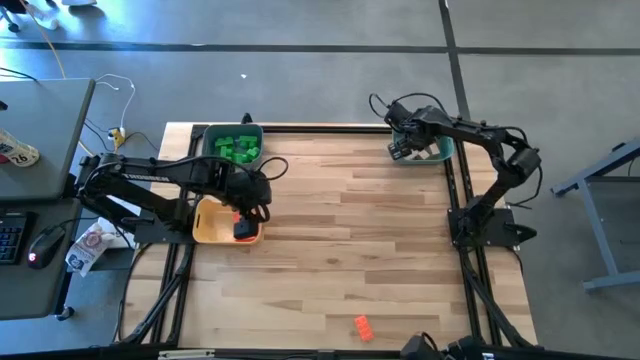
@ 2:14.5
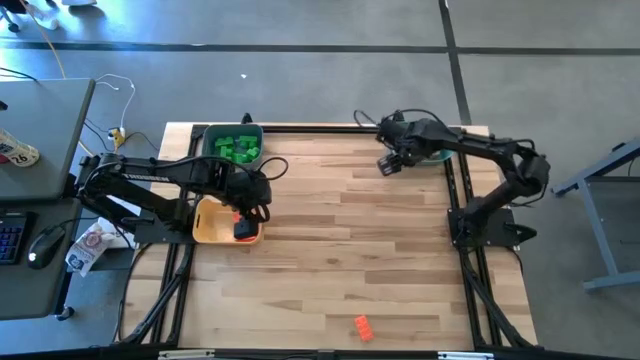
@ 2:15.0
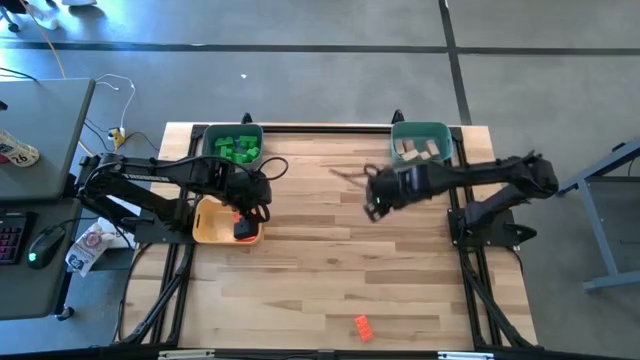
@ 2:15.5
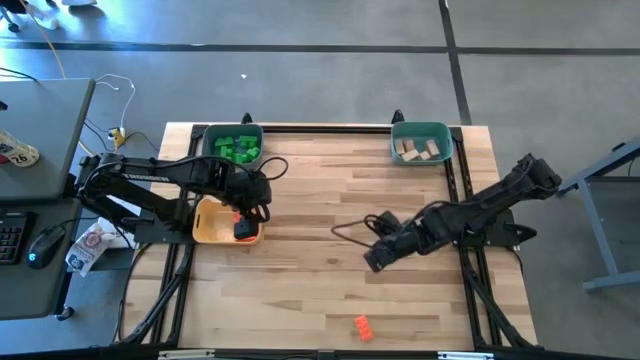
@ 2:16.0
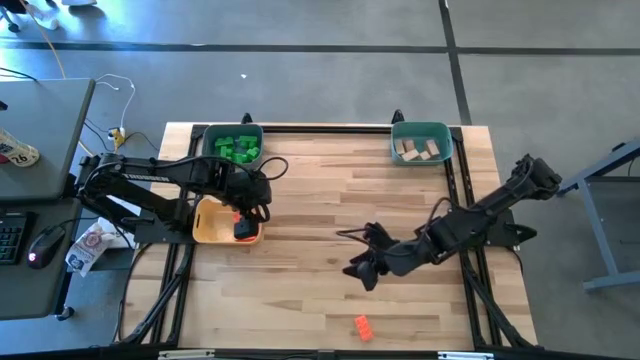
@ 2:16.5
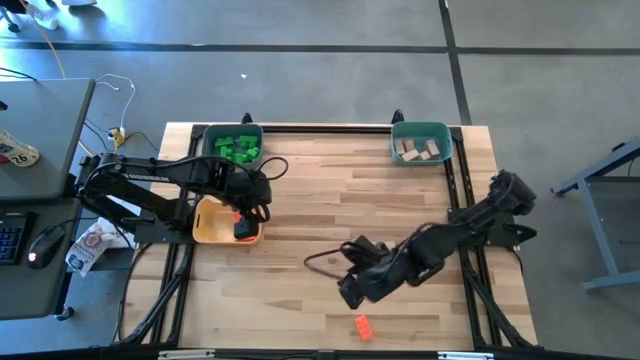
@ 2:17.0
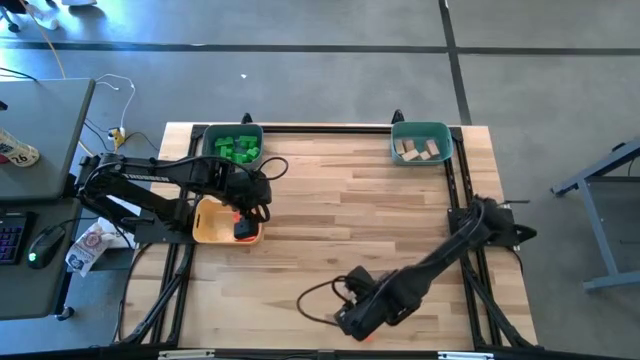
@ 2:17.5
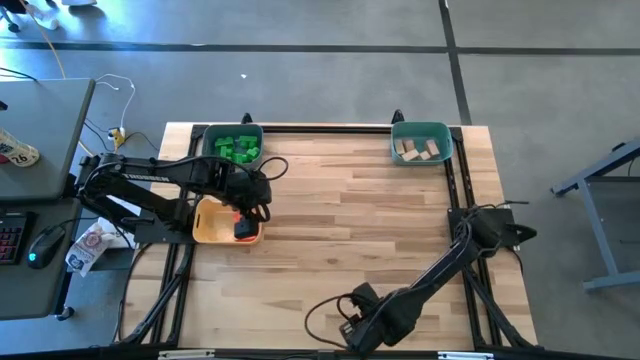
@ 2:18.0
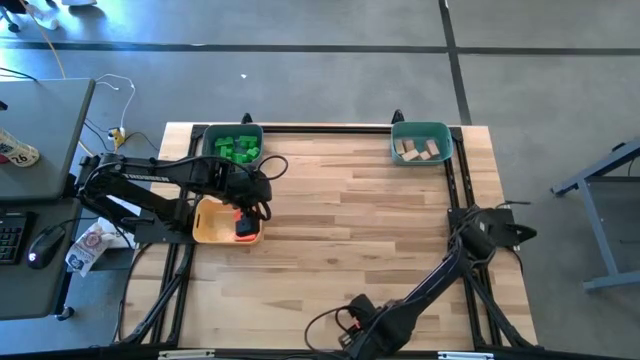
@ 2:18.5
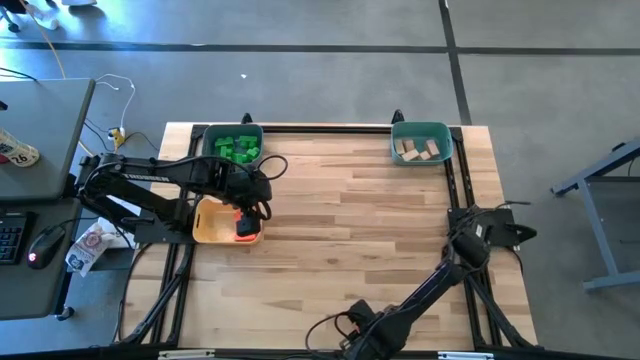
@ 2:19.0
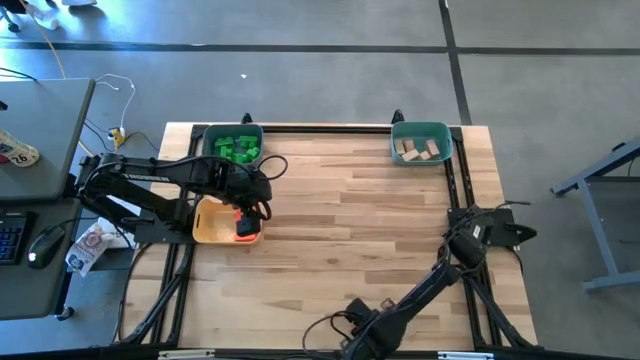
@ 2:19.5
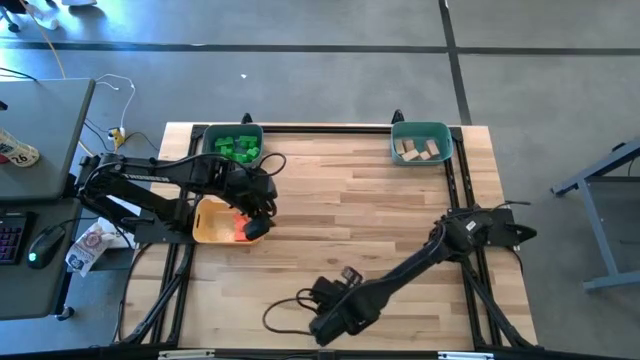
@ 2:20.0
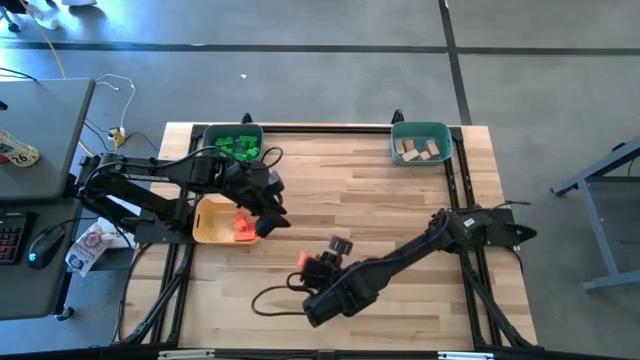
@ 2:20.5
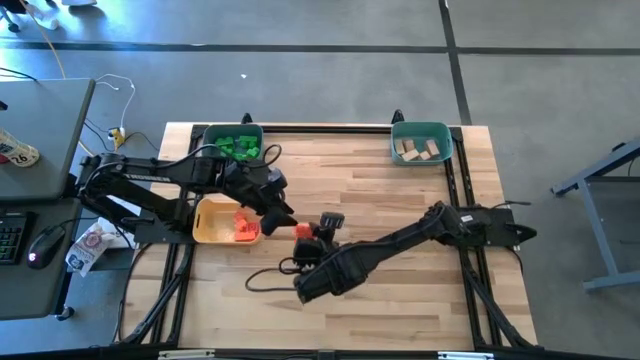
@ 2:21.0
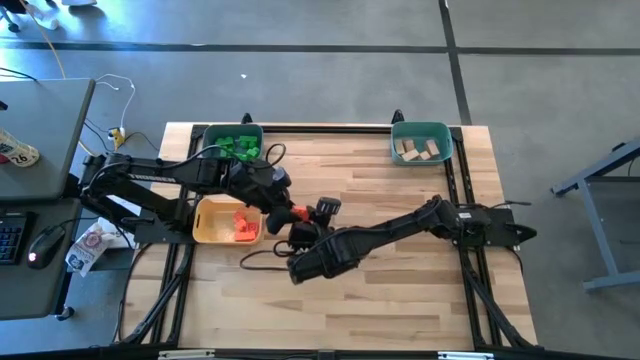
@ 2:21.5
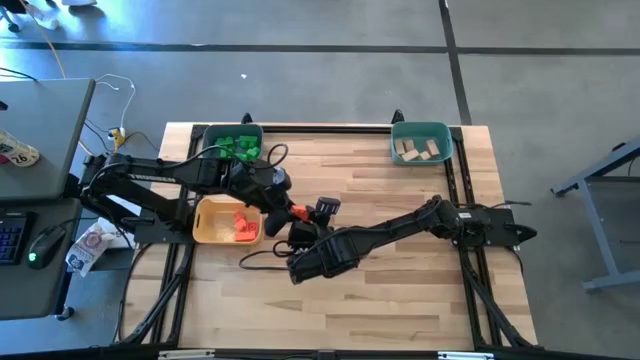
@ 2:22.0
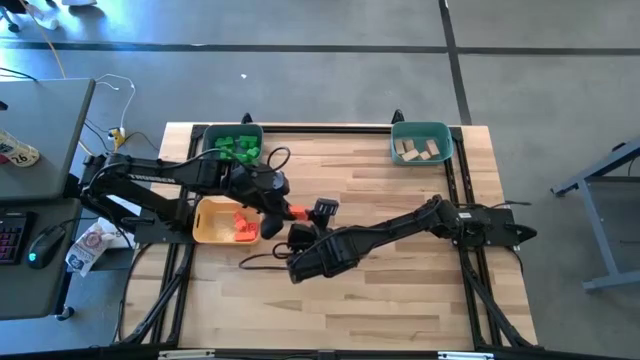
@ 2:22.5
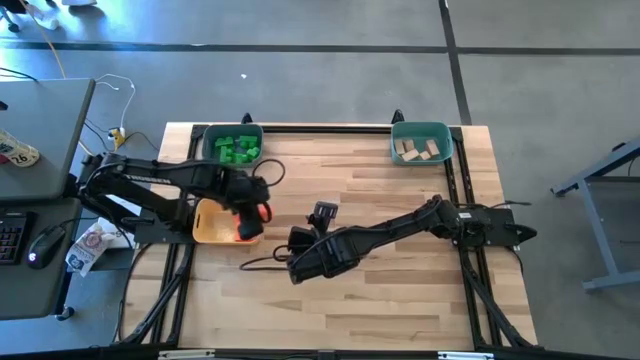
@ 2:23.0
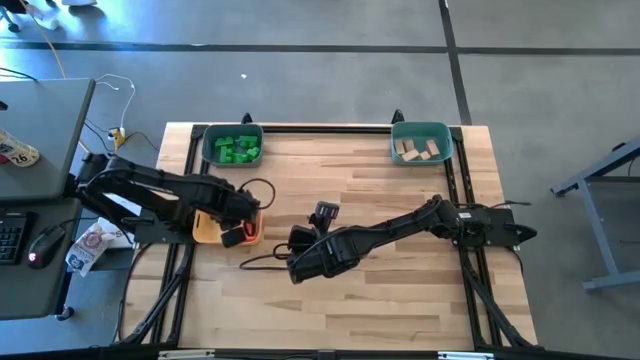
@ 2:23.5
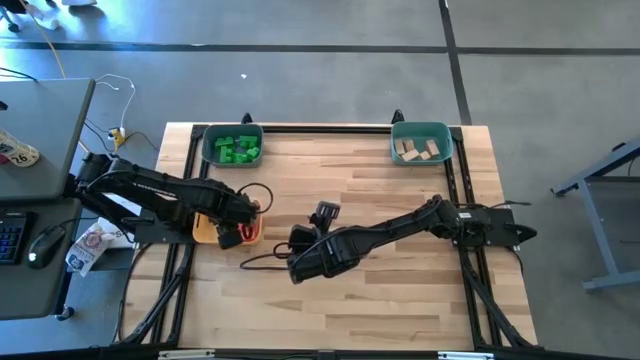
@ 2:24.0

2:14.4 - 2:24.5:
Task: Sort & place blocks by color
Put the orange game piece into the yellow bin

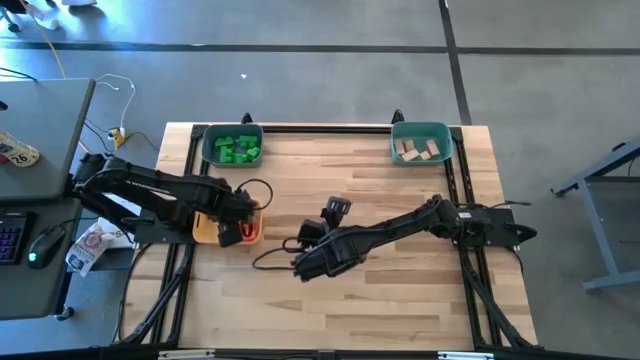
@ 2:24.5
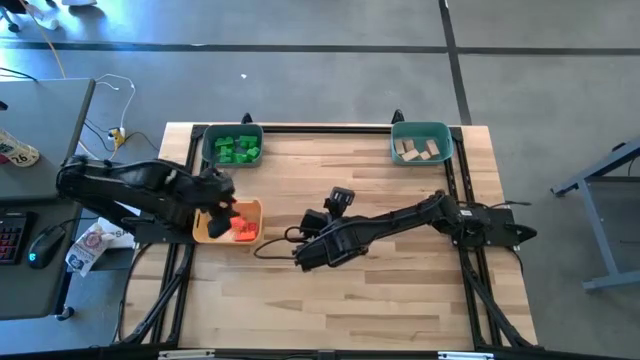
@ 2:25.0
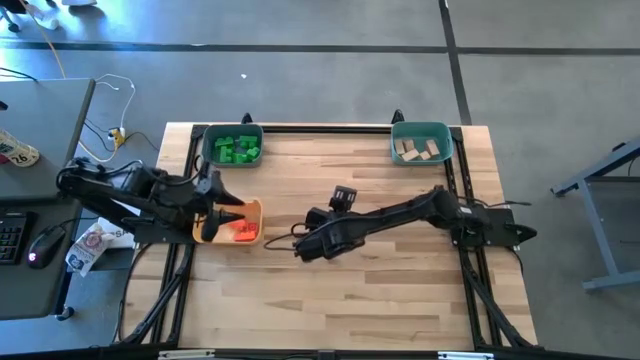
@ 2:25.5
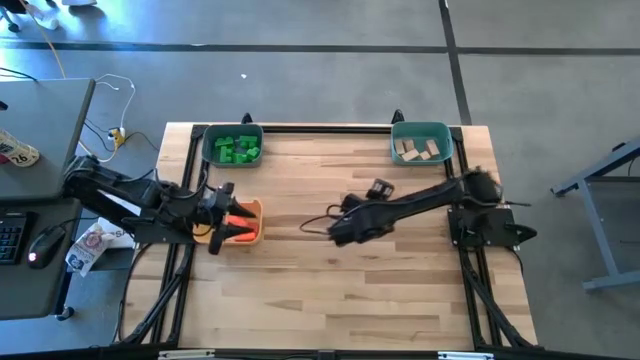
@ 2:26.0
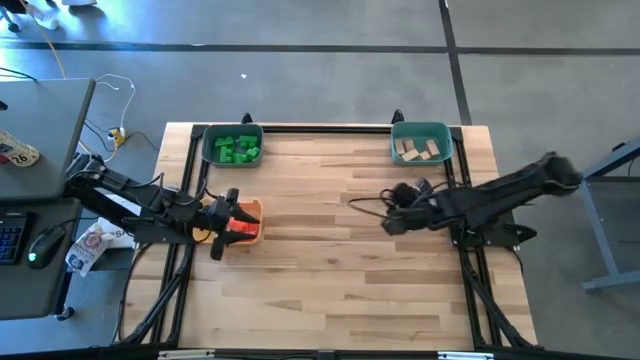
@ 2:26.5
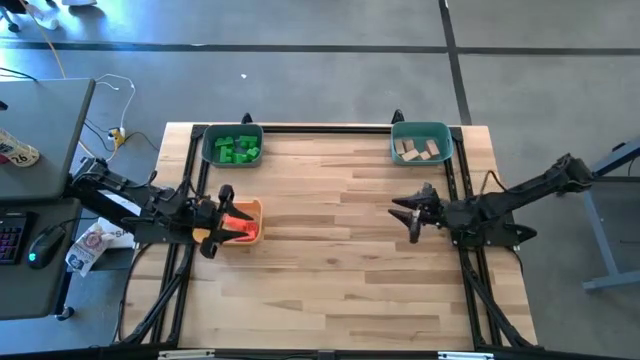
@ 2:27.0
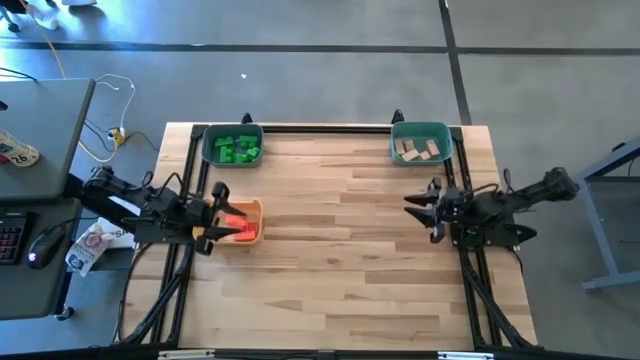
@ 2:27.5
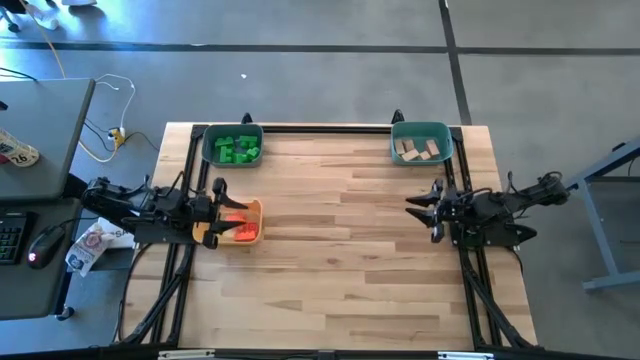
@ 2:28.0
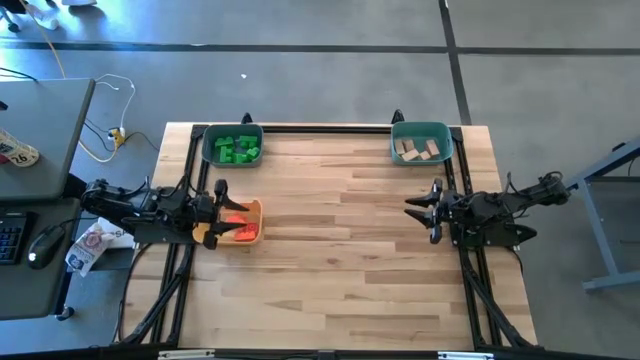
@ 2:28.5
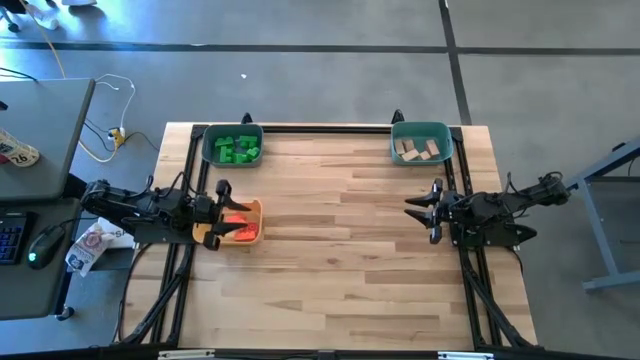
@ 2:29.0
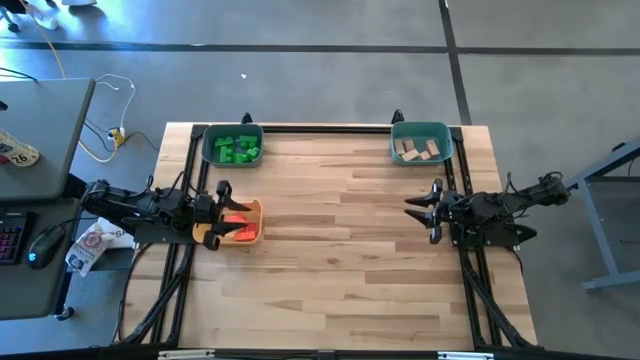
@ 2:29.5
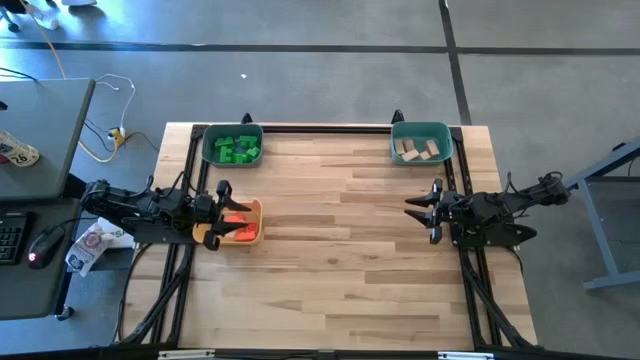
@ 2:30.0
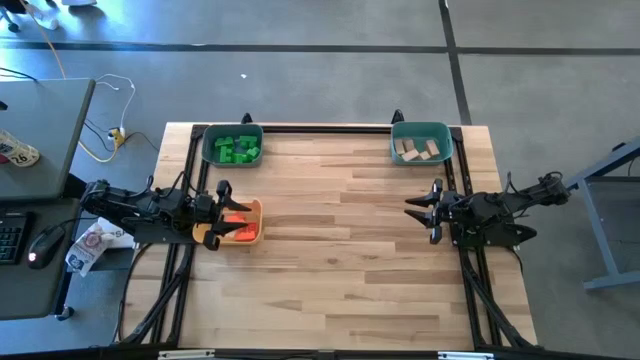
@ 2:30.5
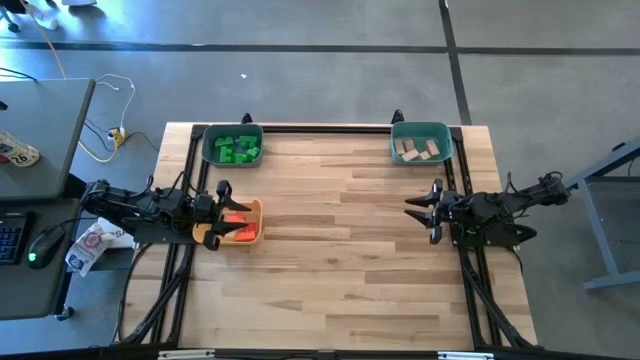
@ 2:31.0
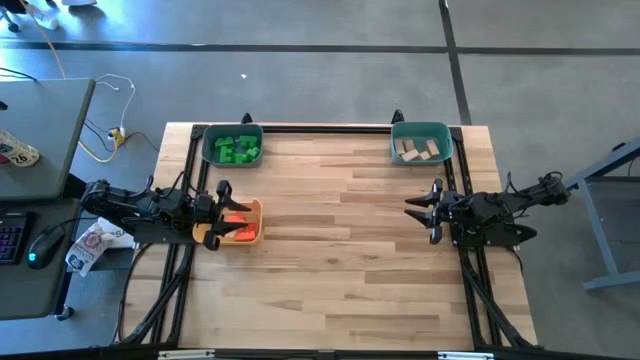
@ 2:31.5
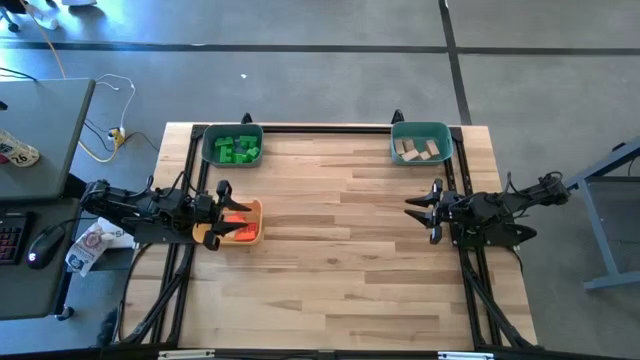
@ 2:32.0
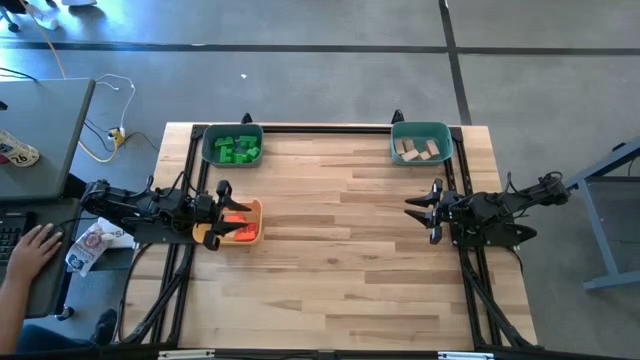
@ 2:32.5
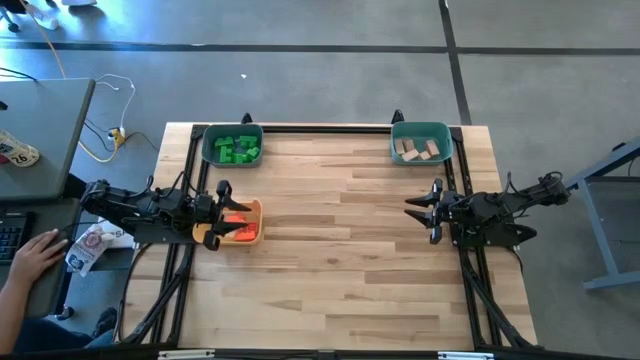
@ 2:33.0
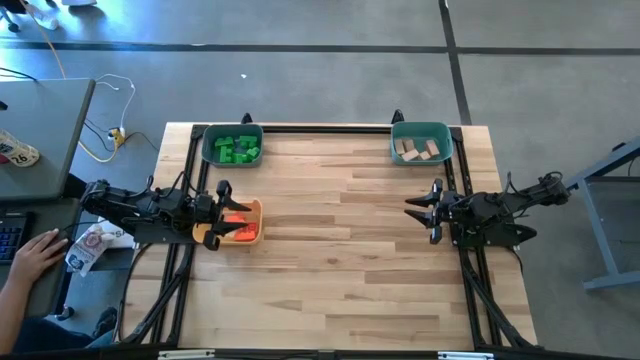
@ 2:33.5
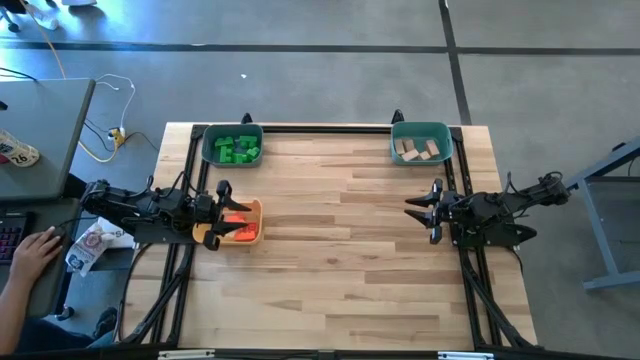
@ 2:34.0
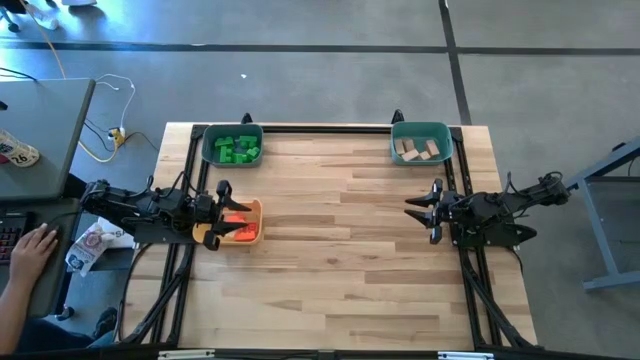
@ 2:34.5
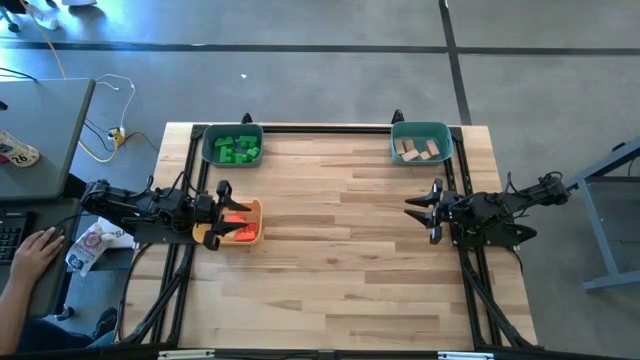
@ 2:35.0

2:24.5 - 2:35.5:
Return to Home Position

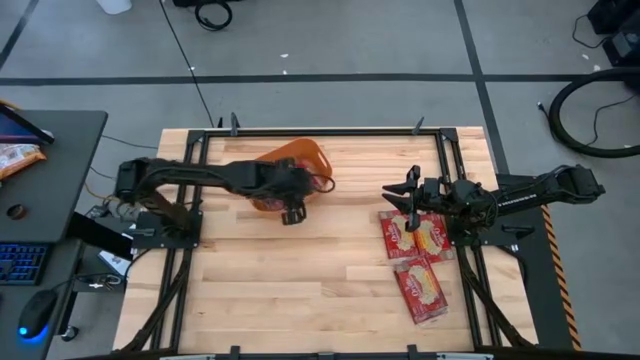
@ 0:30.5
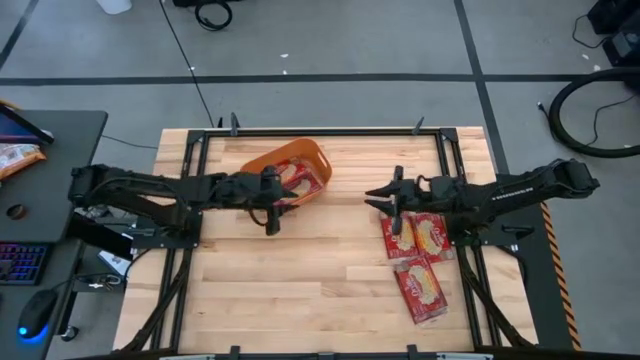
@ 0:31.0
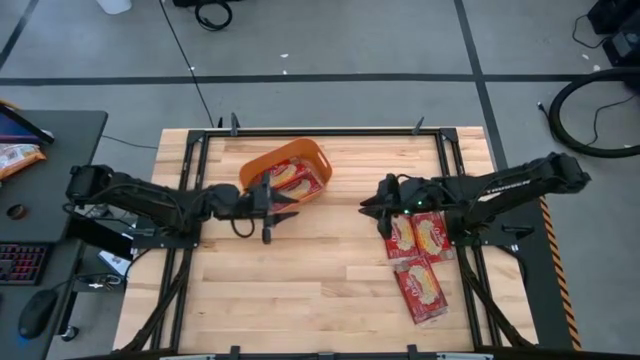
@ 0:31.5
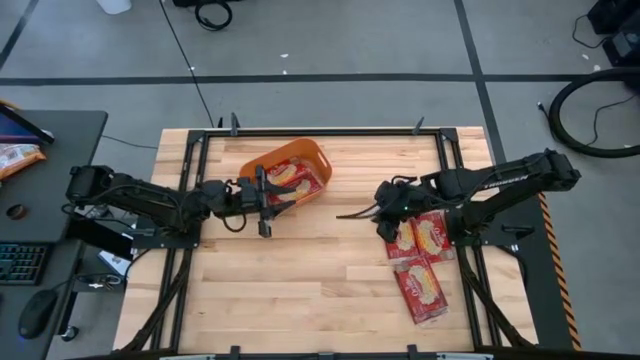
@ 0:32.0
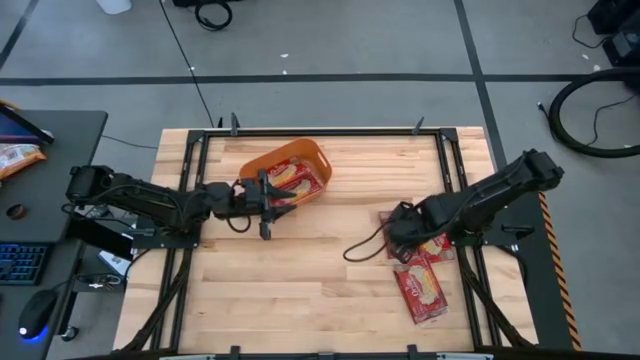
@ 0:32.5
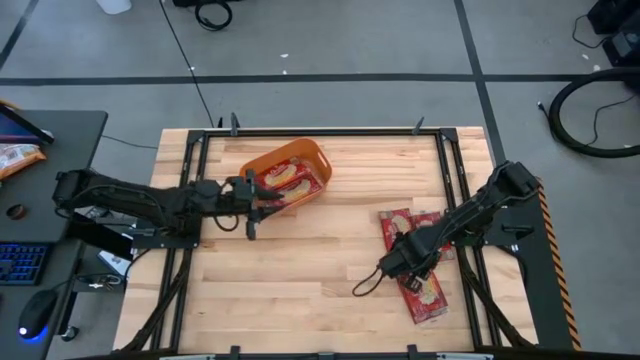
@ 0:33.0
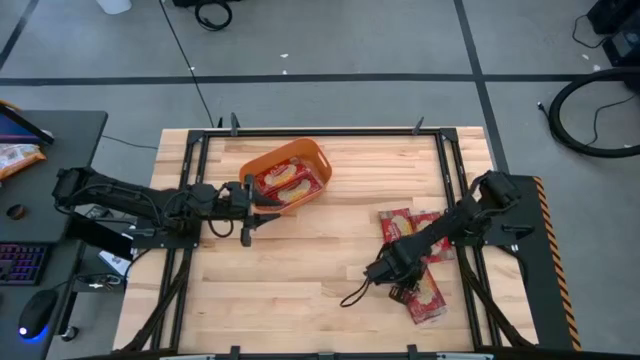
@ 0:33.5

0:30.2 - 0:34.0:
Task: Sort popcorn bags into baskets
Adjust the red popcorn bags
